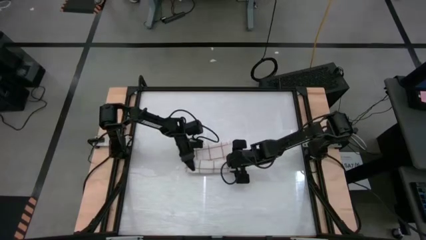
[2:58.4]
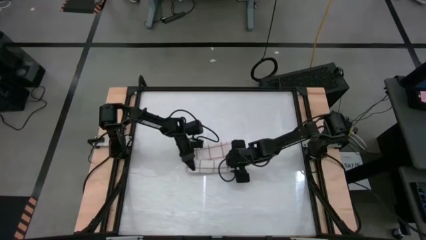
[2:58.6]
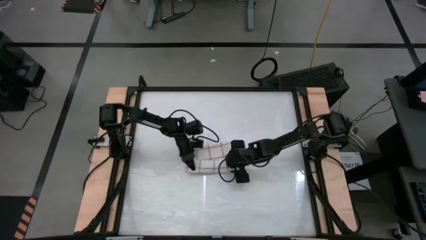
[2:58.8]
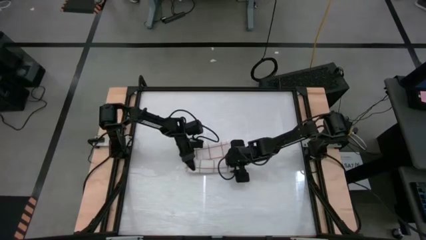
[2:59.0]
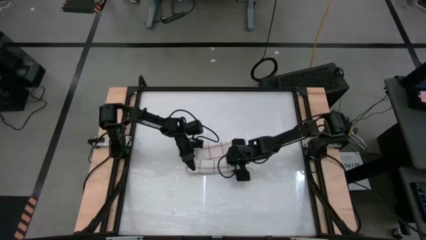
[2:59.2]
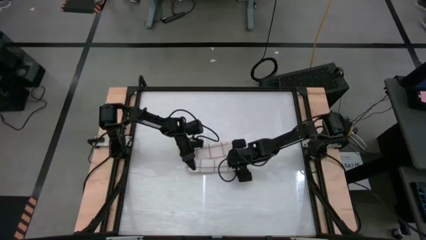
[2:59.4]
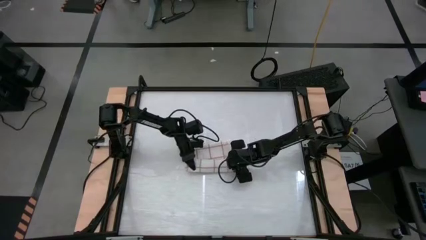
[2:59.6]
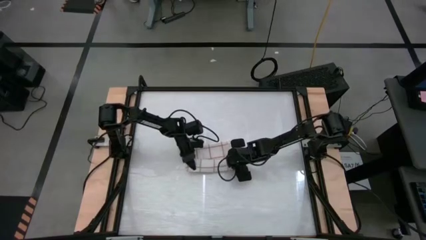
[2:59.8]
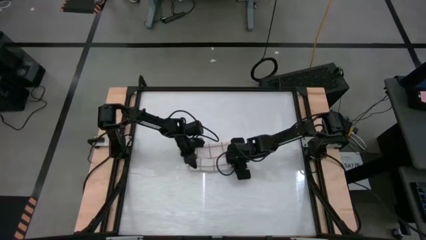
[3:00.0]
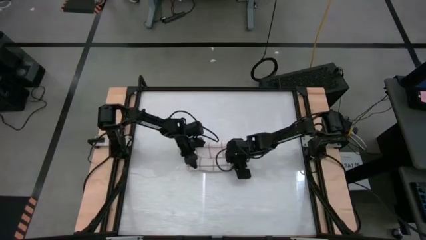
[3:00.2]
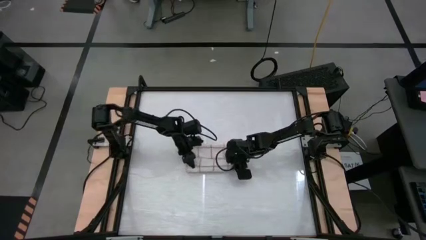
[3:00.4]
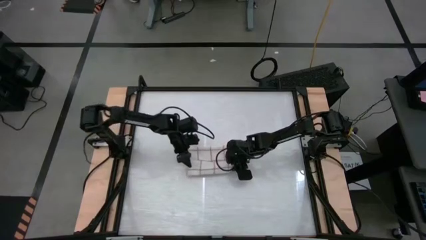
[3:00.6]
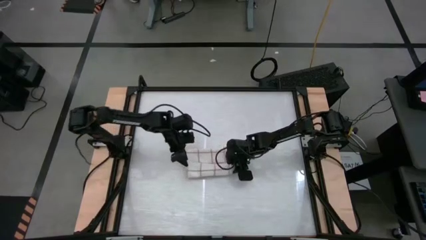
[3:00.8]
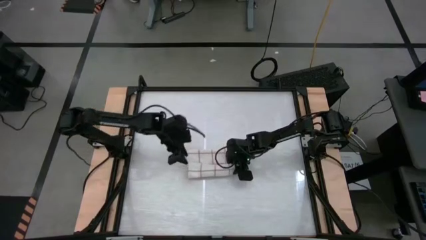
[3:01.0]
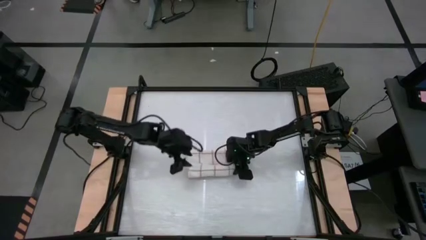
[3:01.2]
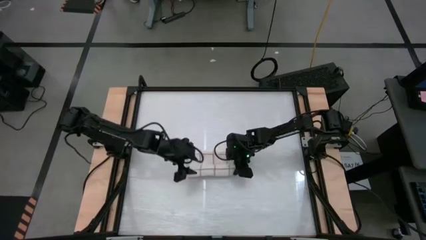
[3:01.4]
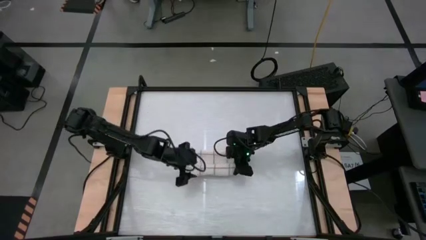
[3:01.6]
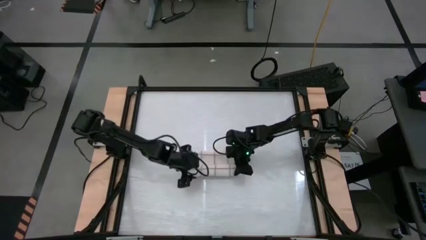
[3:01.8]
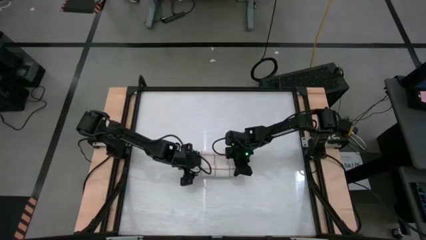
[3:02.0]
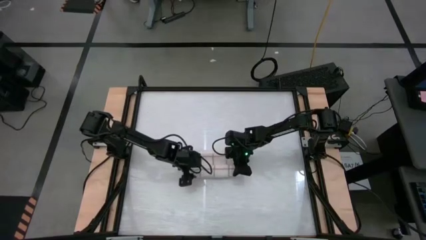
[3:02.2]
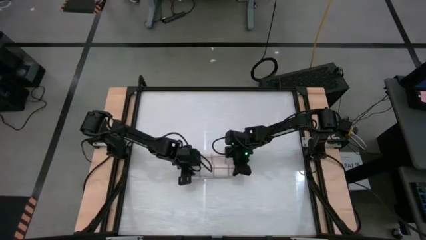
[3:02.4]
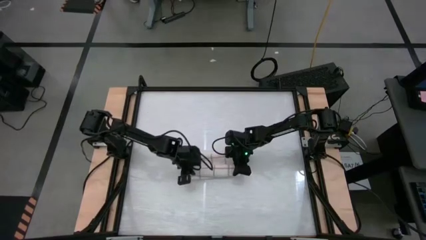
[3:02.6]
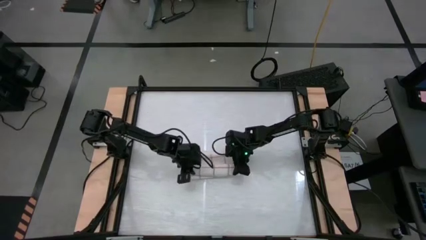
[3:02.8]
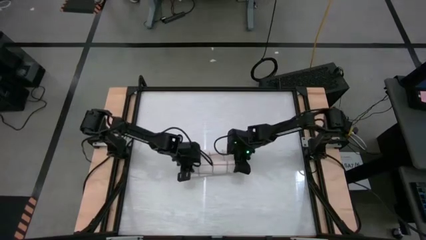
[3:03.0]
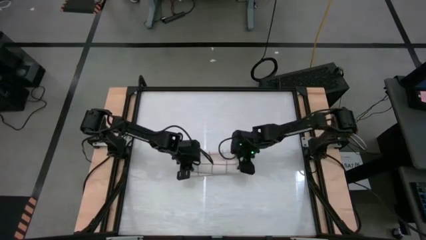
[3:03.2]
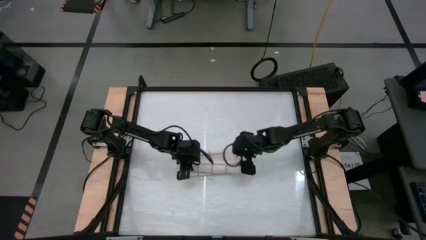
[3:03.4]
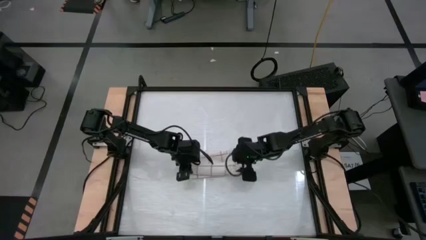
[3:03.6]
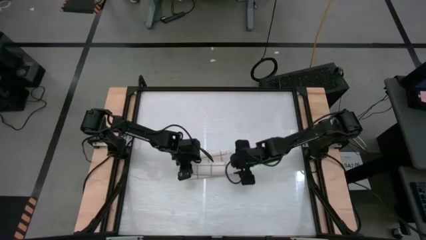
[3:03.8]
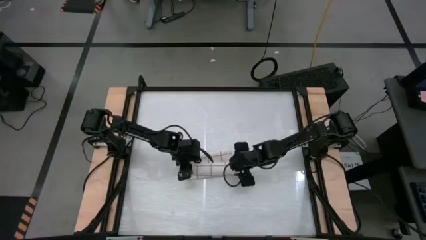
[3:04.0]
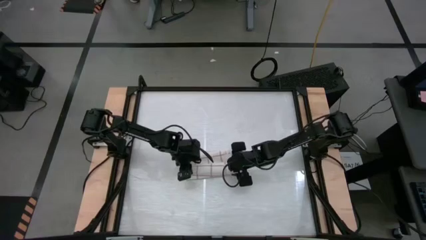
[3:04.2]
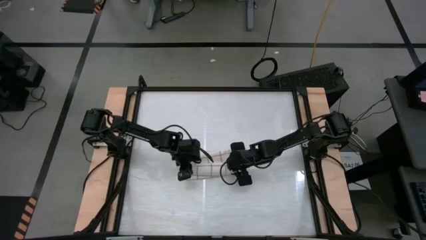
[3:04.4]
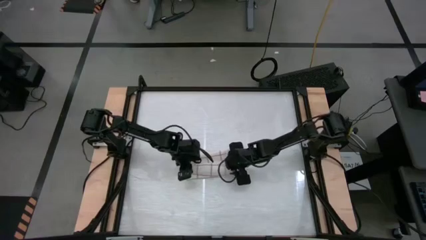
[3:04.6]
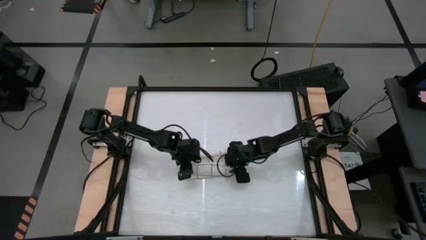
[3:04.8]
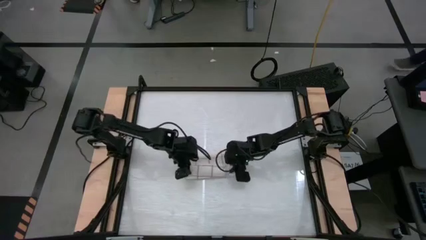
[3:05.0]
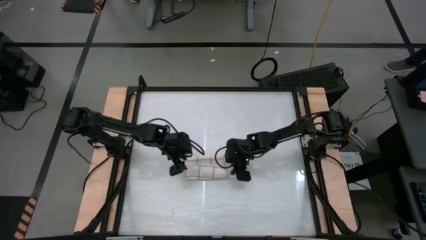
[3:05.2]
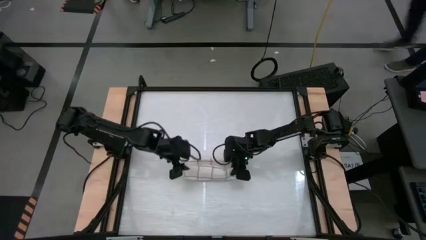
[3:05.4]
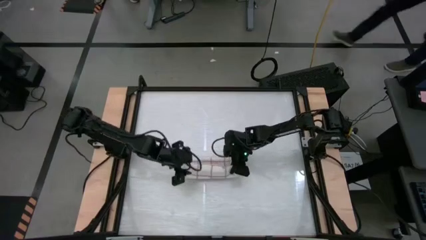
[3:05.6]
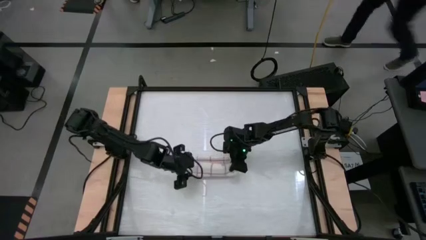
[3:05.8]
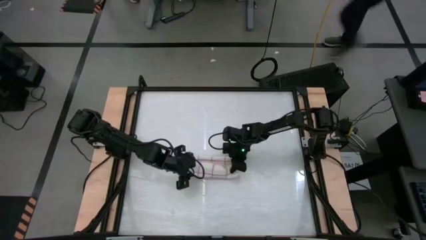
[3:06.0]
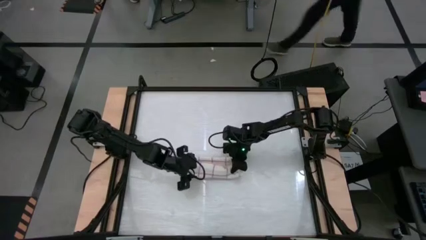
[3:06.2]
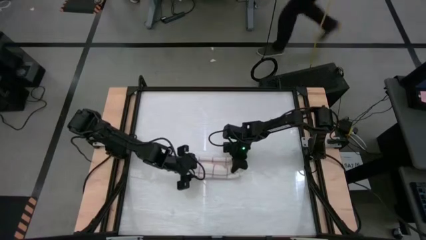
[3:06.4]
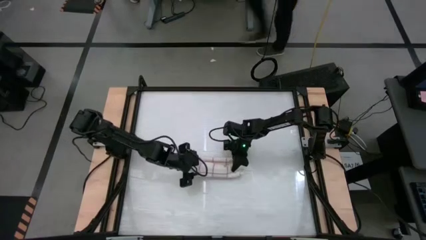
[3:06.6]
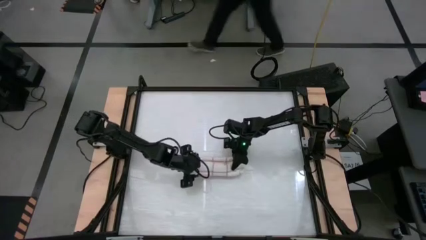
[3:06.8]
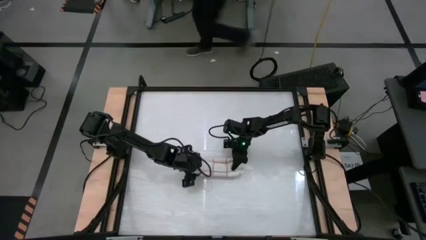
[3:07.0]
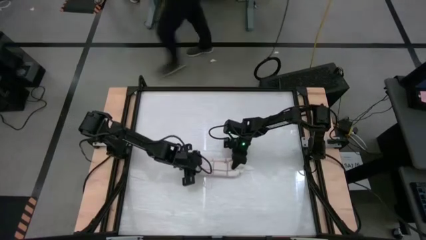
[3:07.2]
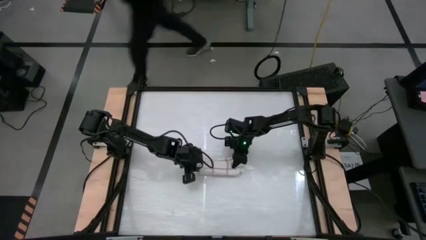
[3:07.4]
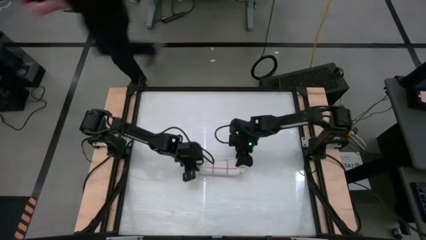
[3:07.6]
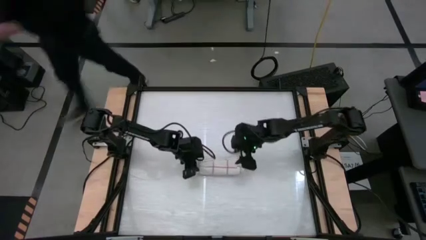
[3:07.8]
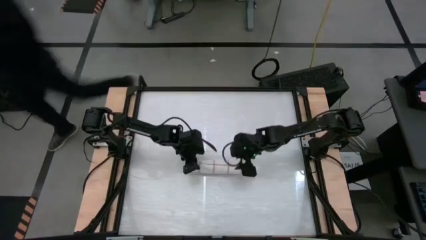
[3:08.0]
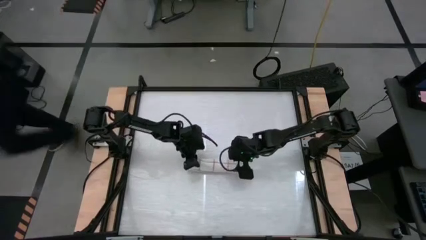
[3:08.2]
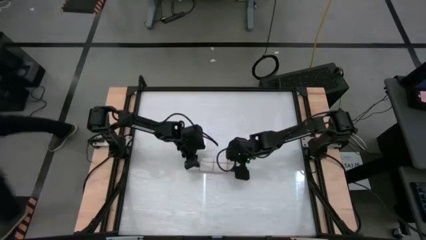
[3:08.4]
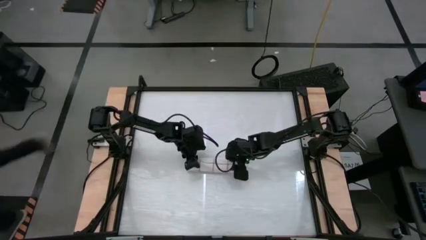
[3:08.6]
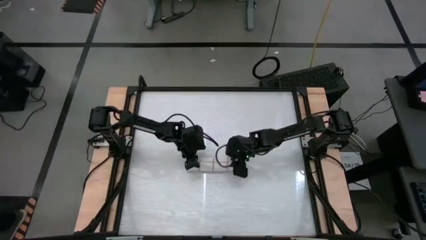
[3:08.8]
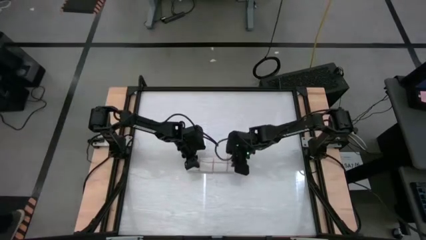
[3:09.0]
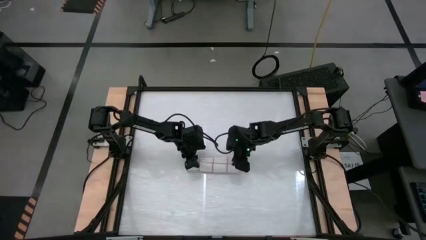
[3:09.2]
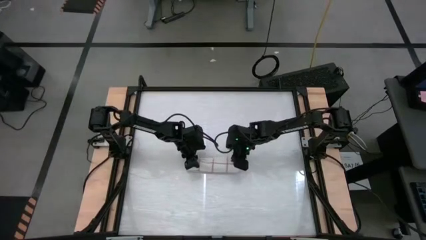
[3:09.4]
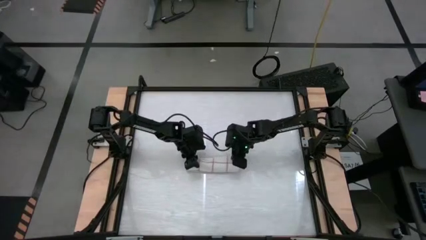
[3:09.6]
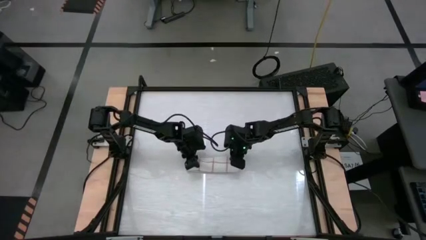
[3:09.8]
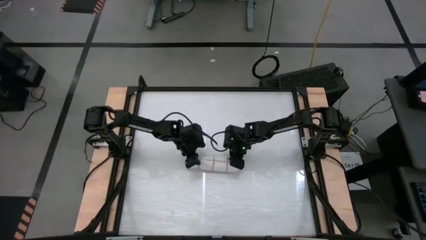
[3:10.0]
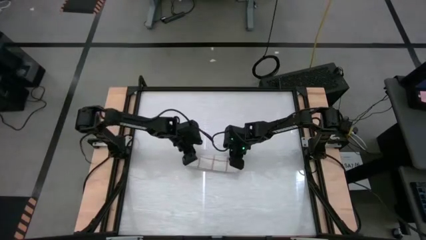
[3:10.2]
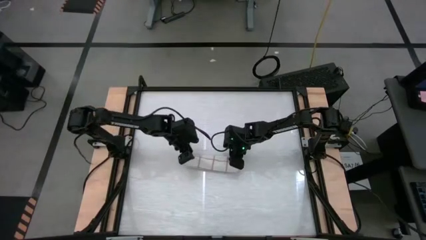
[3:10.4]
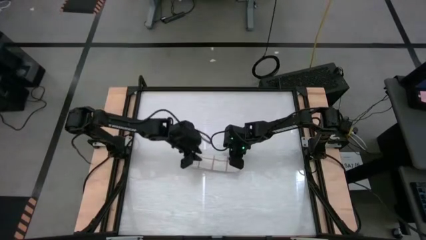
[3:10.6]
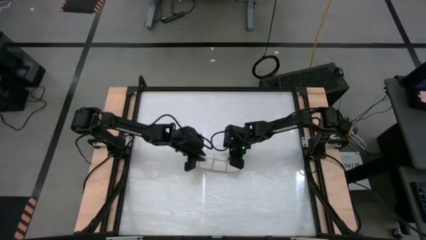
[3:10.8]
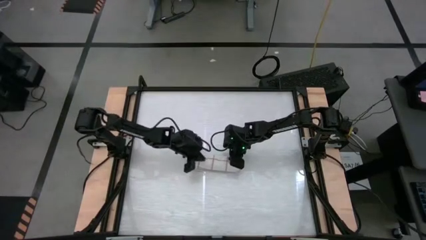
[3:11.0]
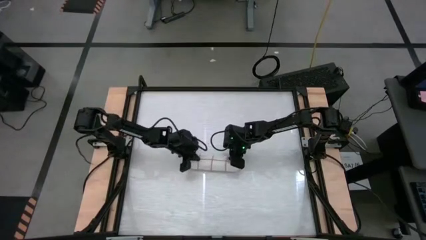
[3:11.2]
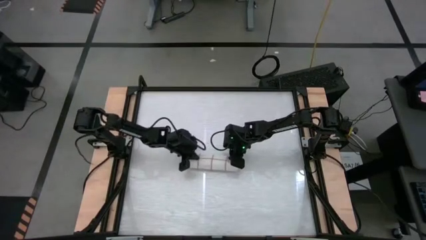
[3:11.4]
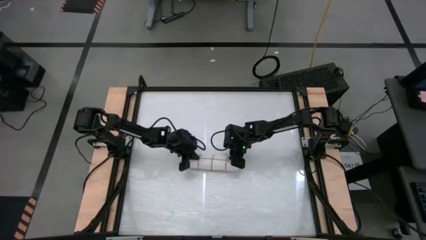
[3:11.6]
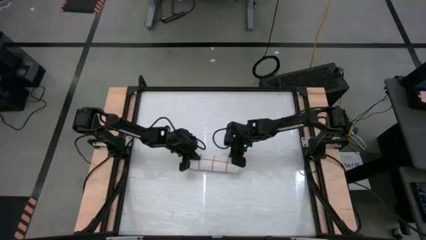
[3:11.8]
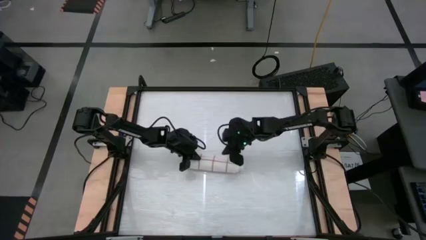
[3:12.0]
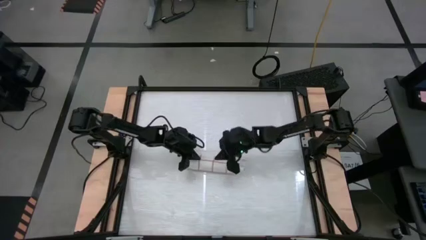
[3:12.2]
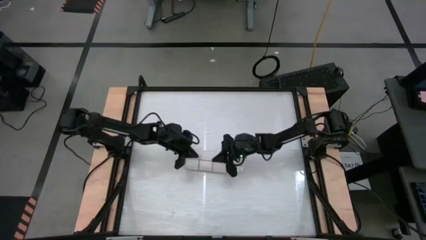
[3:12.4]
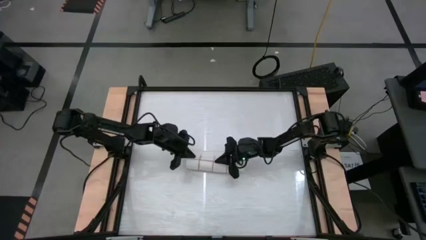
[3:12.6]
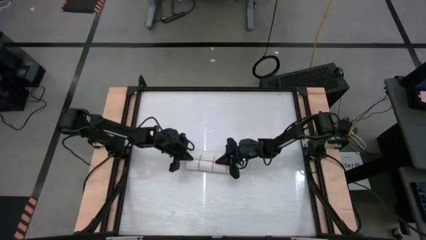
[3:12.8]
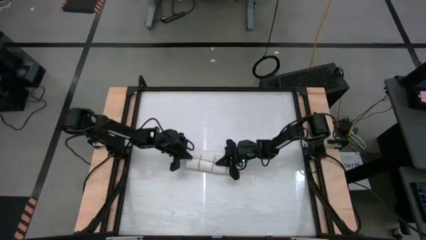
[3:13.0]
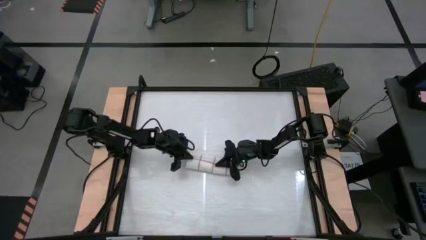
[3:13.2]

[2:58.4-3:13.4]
Task: Roll towel
Roll the white checkered towel
